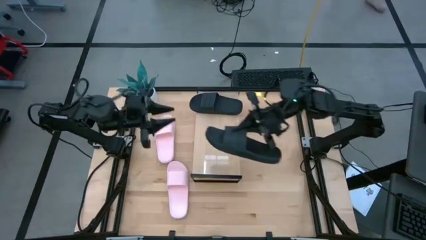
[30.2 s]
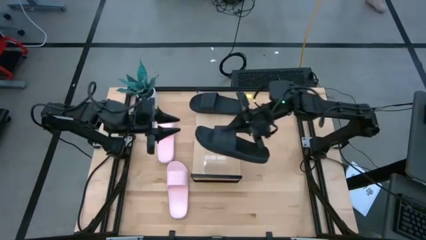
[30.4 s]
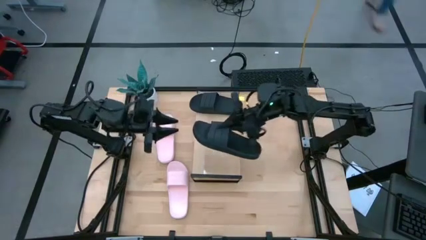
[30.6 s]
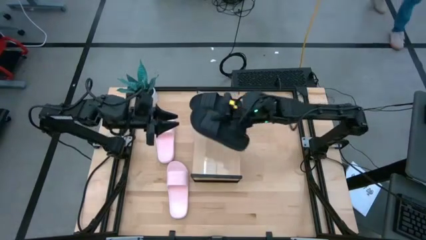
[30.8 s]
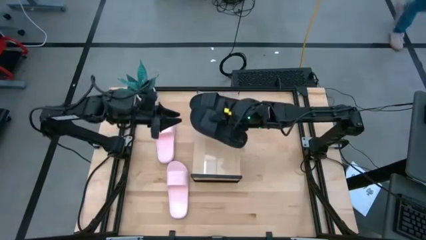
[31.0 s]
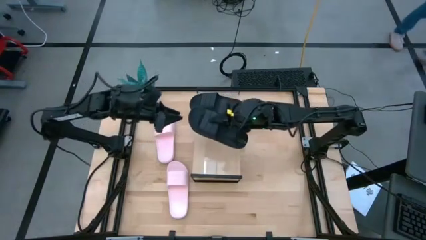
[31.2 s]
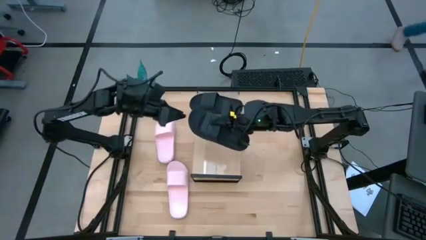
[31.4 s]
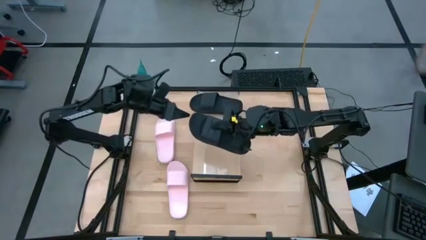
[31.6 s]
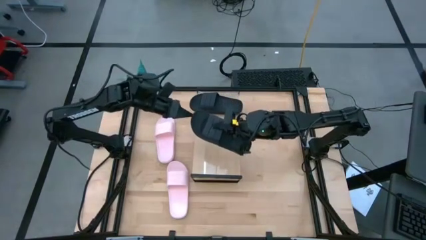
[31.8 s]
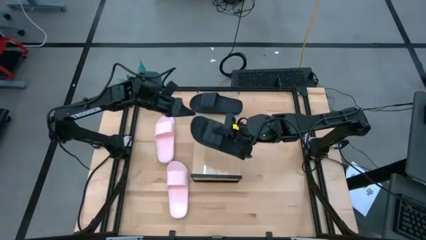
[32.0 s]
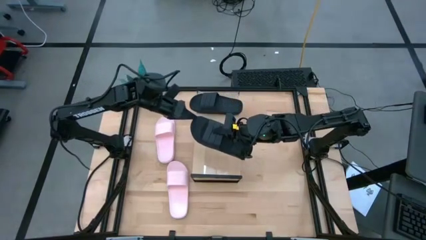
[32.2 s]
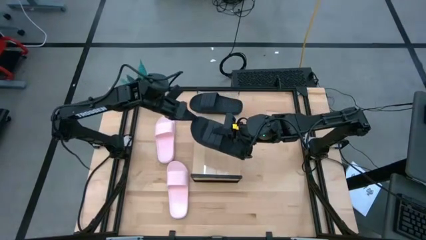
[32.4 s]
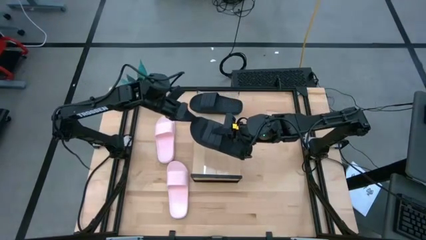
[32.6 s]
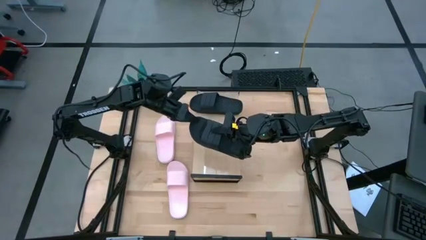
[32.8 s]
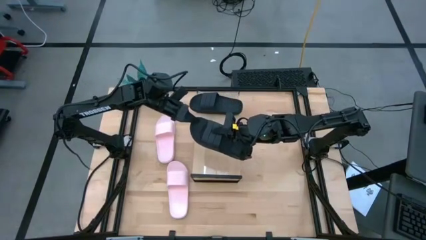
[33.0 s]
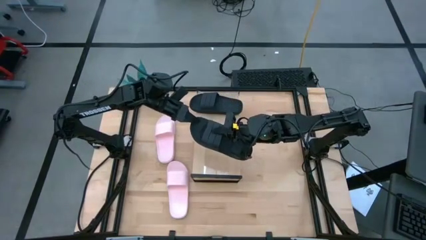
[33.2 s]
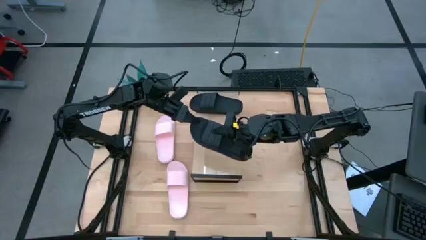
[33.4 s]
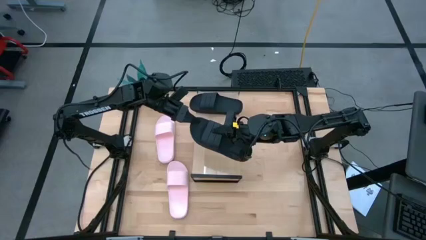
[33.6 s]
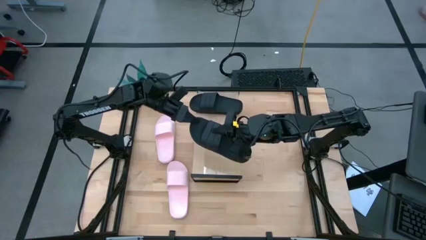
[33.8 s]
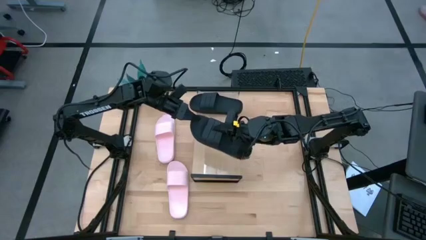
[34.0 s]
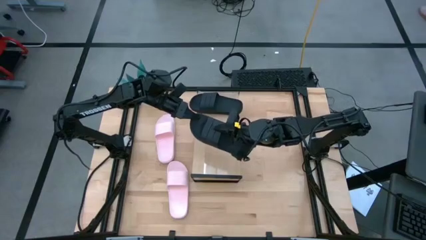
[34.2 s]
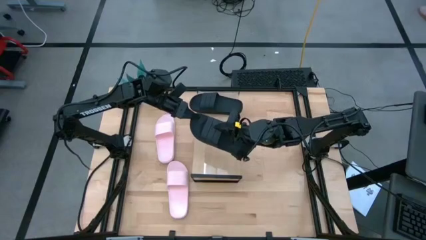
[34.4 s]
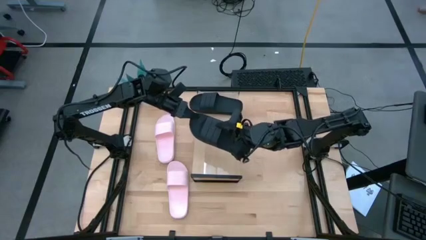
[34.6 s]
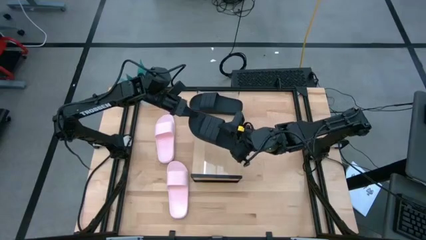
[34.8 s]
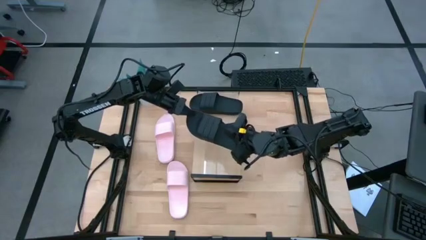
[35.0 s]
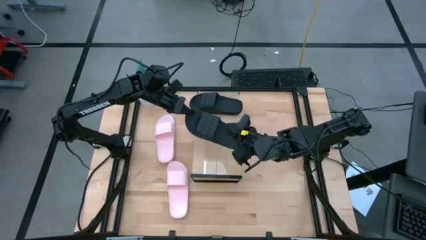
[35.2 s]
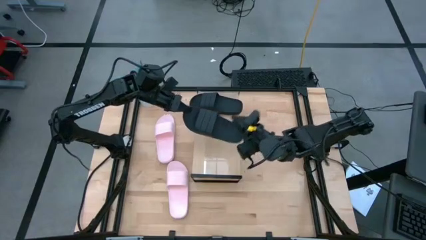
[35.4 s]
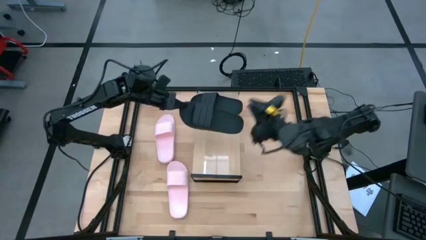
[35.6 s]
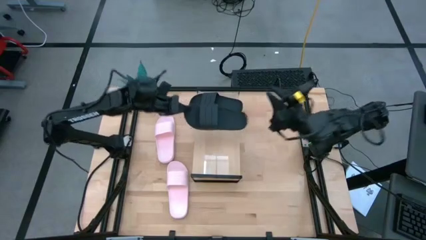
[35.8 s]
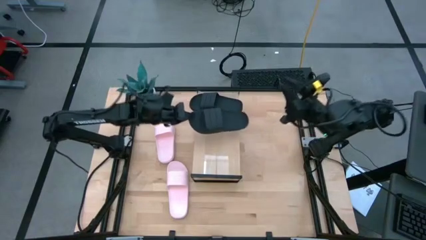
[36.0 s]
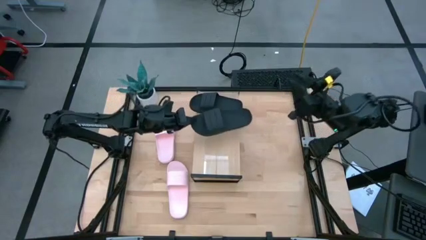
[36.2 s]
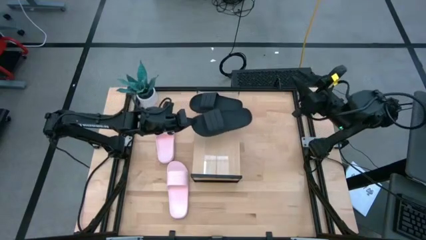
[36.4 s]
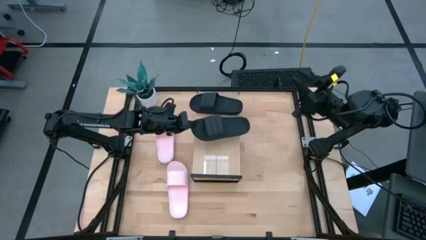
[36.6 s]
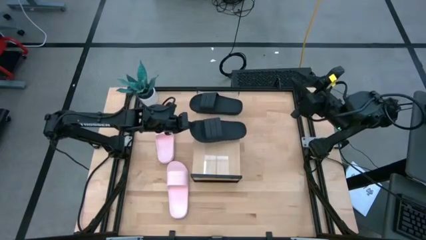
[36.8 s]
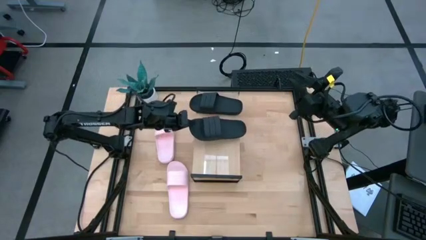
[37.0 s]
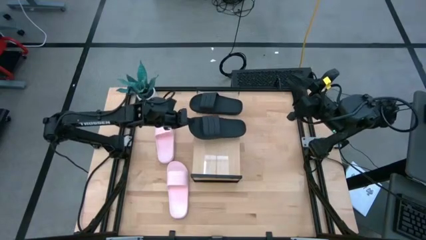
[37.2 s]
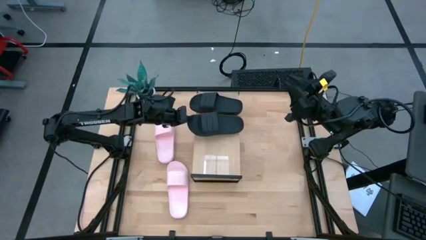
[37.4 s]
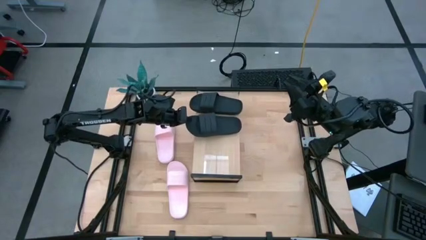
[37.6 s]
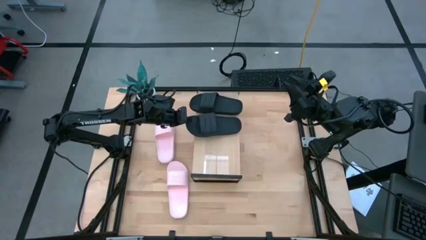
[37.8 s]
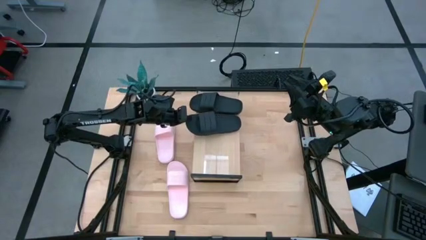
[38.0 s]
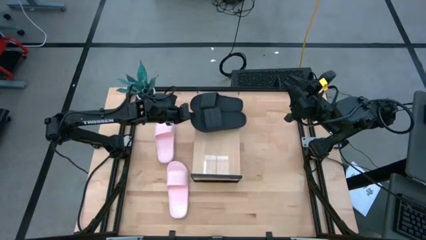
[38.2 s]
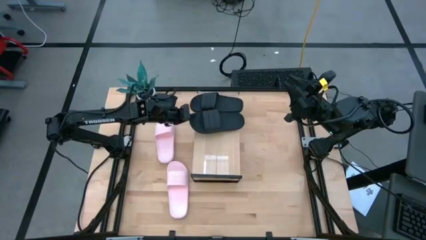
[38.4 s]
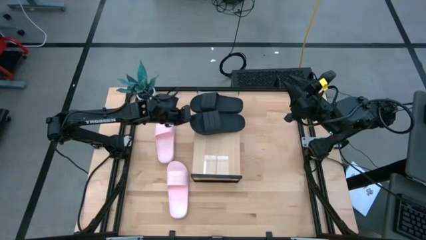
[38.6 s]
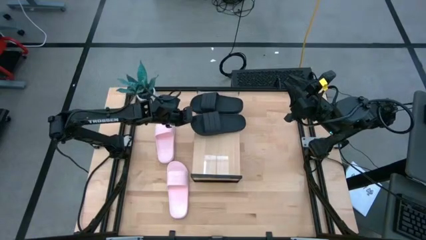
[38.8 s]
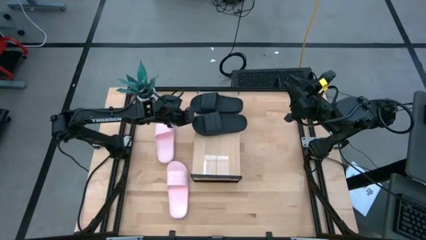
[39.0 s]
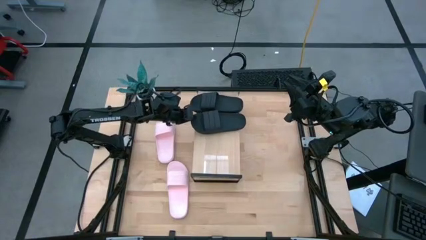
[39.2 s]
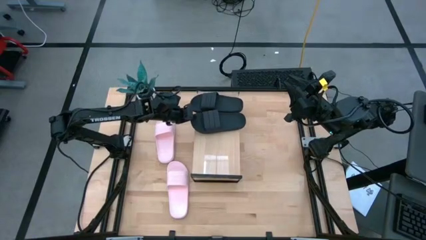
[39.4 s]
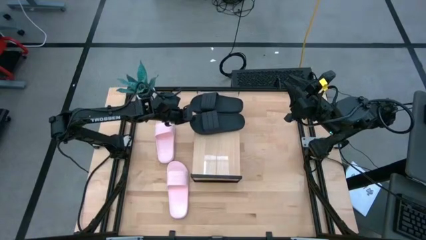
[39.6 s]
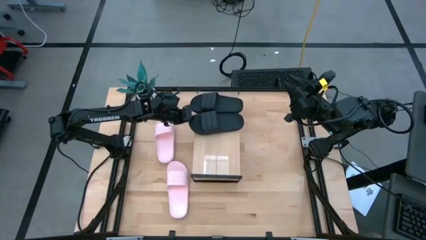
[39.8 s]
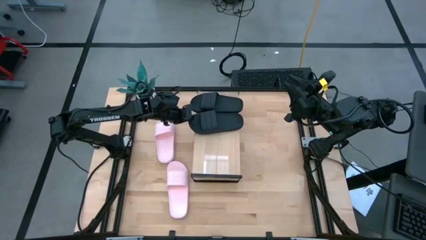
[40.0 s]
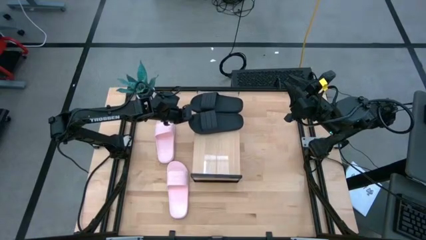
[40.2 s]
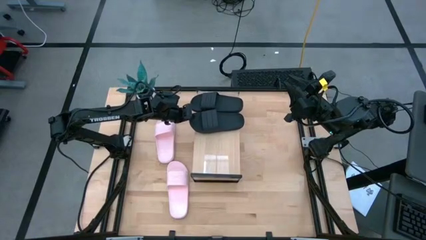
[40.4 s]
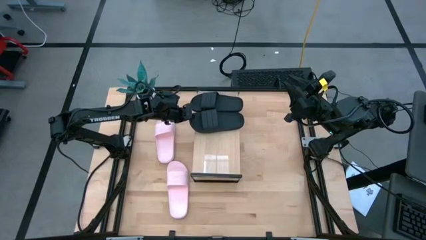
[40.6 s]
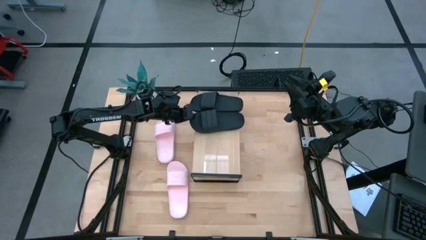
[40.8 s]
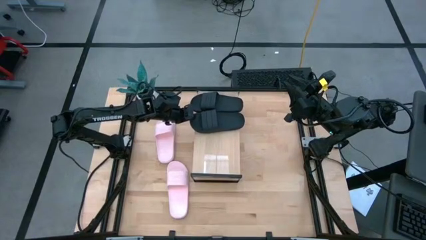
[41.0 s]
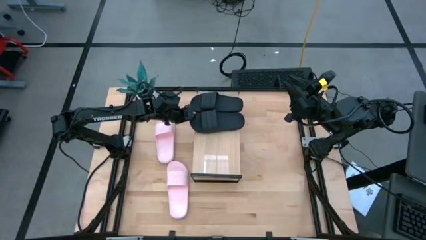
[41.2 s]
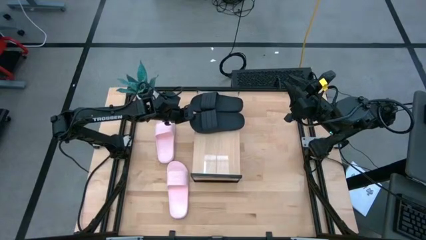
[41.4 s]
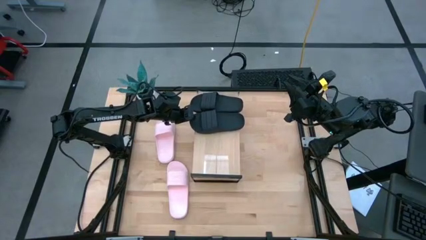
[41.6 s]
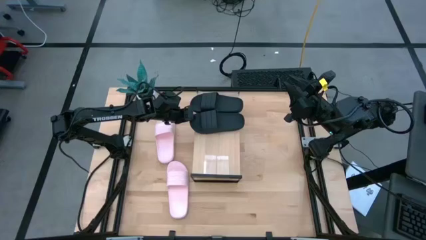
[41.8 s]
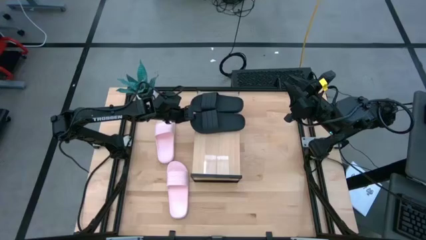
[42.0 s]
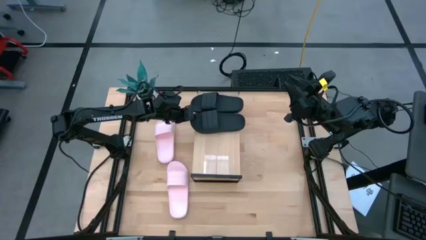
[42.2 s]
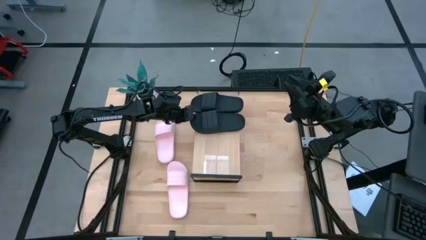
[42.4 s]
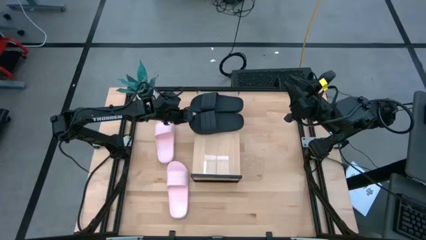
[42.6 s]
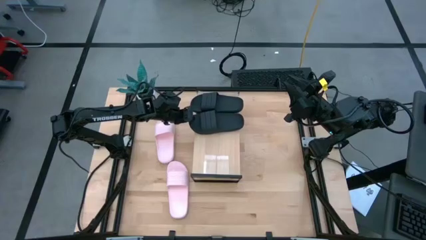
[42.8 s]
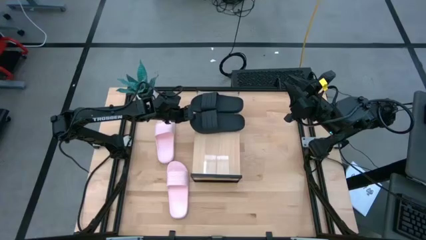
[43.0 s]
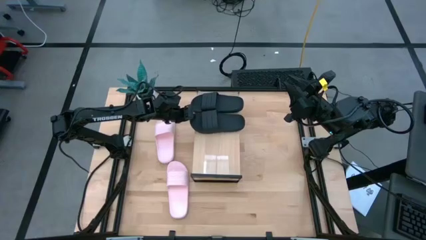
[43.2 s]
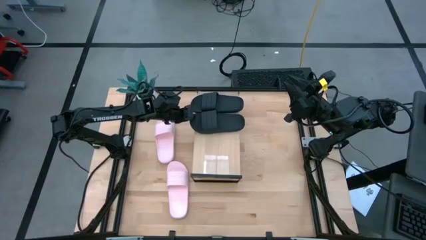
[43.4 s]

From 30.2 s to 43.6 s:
Task: Pick and place slides into the shelf
Put the black slide slipper on the shelf

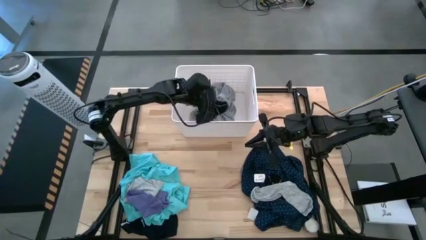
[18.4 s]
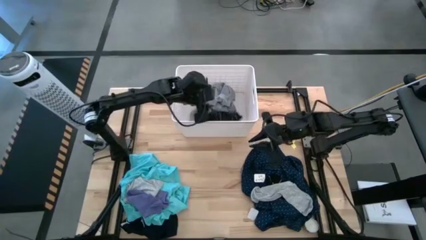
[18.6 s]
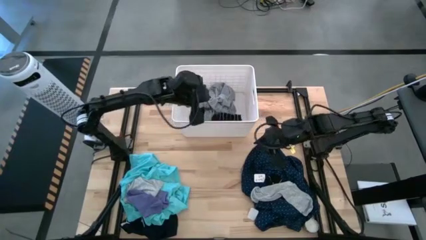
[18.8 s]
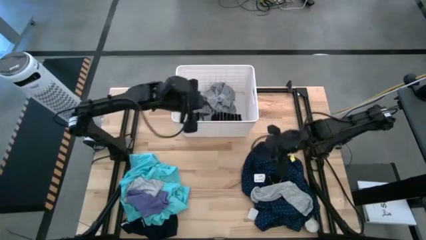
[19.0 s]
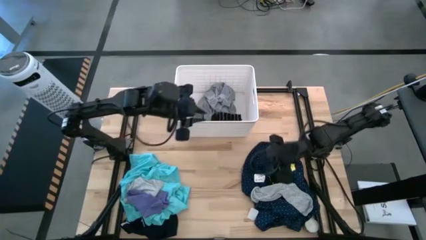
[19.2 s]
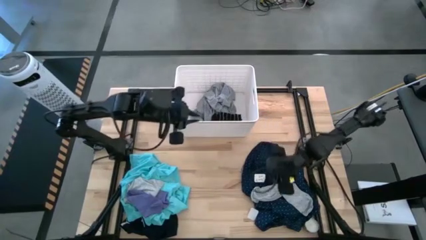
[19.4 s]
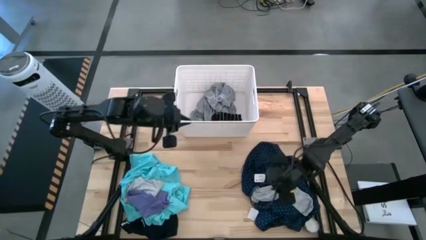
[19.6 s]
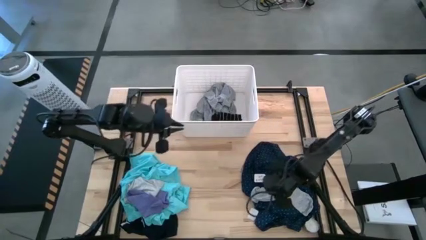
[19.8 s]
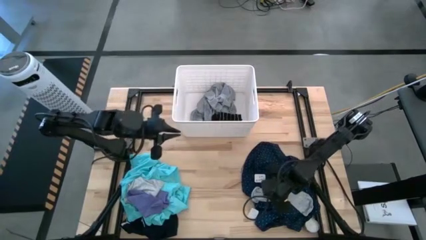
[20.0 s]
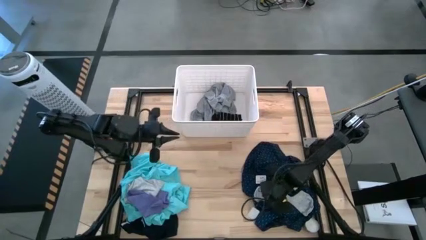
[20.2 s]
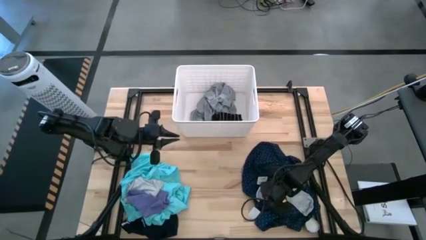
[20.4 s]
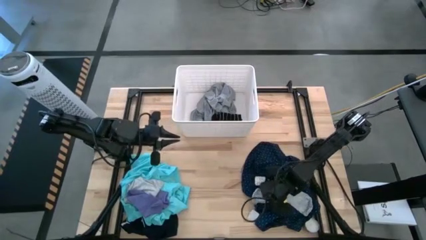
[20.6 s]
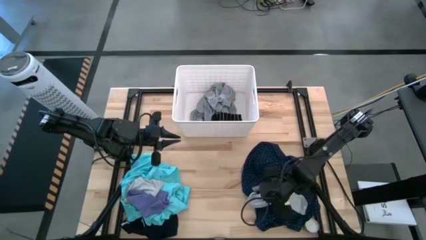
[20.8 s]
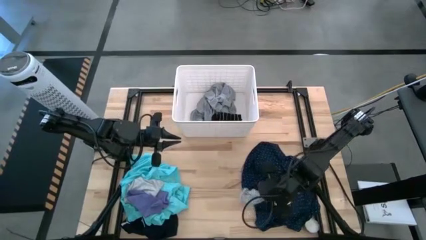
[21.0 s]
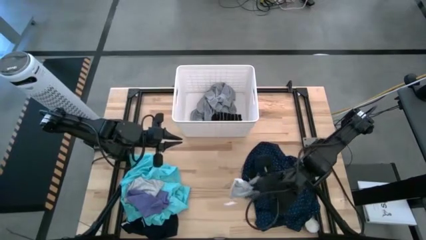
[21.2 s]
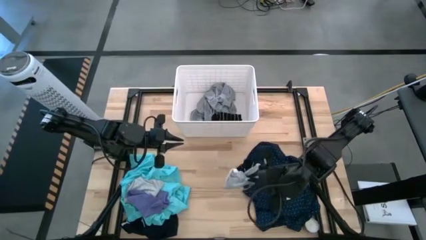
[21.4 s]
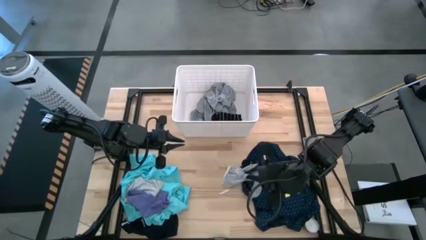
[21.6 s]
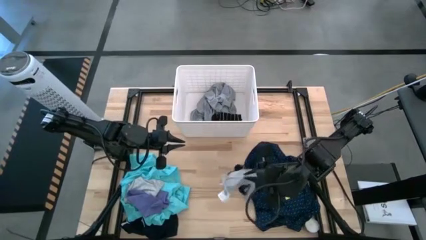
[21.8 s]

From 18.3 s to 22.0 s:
Task: Sort clothes
Put the gray sock into the white laundry bin
